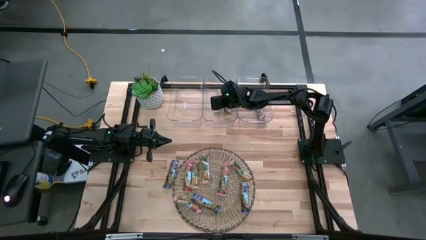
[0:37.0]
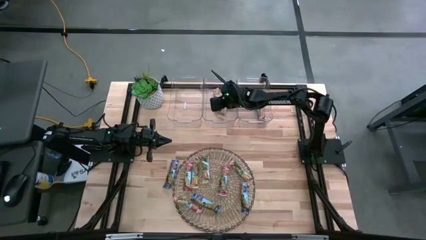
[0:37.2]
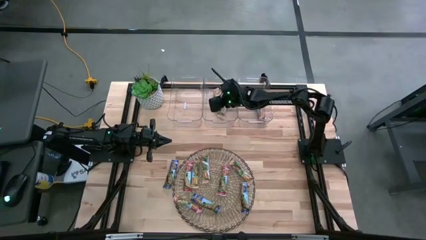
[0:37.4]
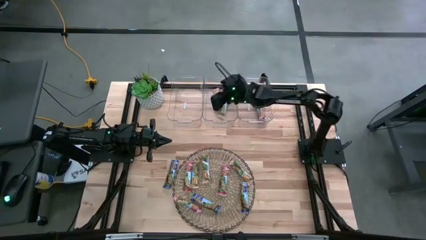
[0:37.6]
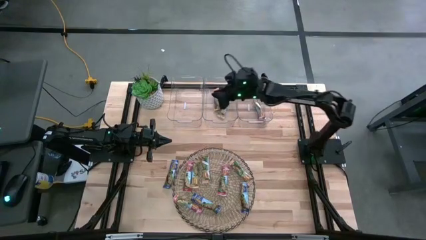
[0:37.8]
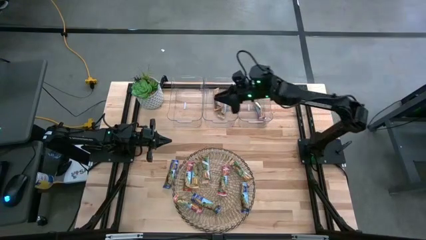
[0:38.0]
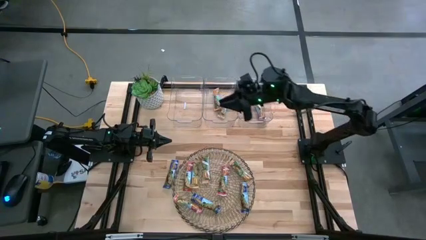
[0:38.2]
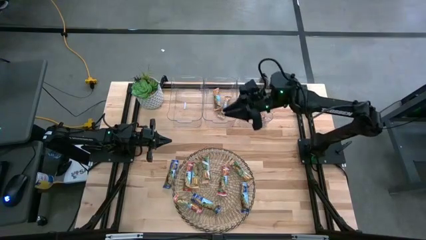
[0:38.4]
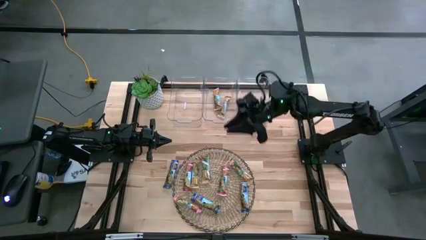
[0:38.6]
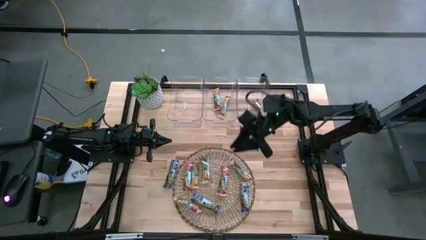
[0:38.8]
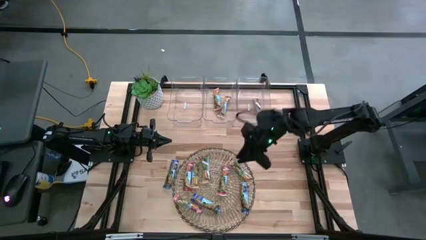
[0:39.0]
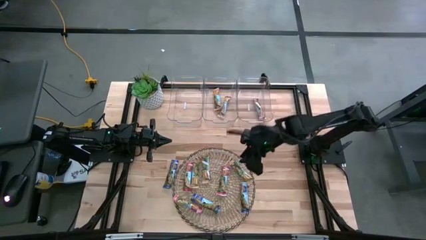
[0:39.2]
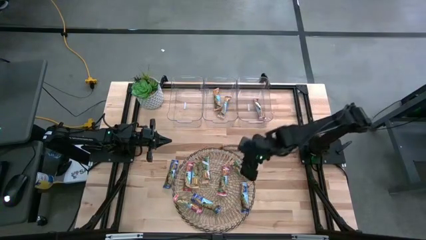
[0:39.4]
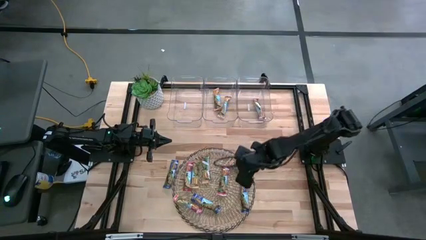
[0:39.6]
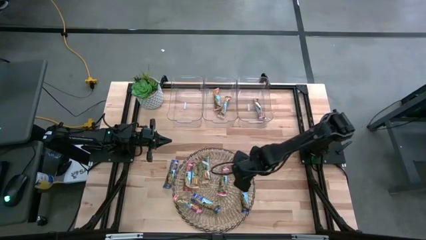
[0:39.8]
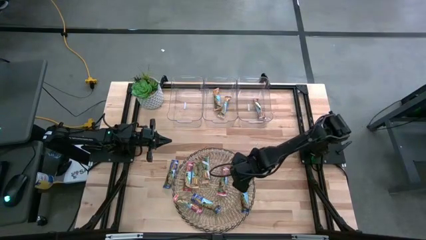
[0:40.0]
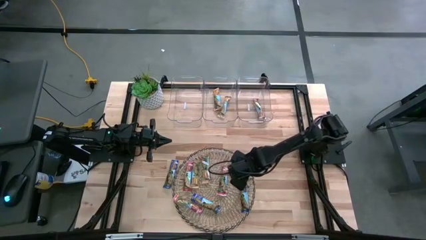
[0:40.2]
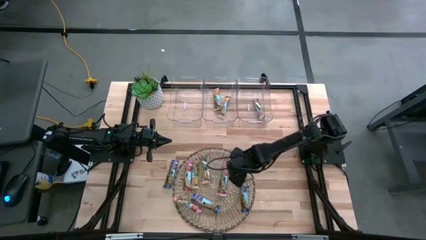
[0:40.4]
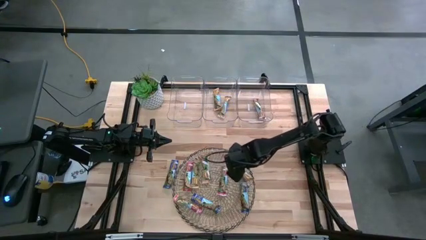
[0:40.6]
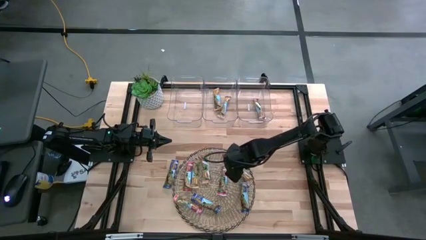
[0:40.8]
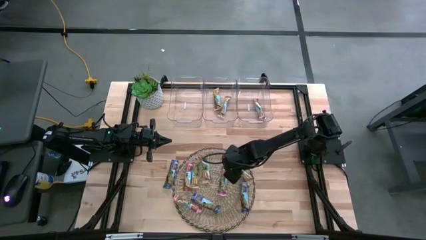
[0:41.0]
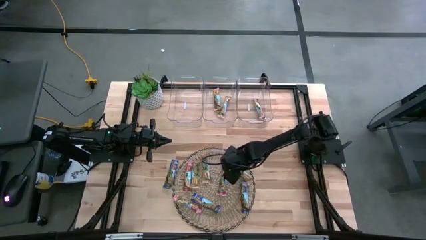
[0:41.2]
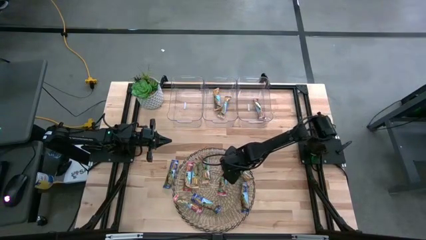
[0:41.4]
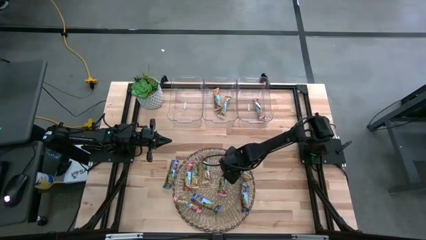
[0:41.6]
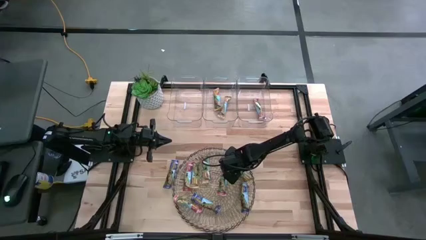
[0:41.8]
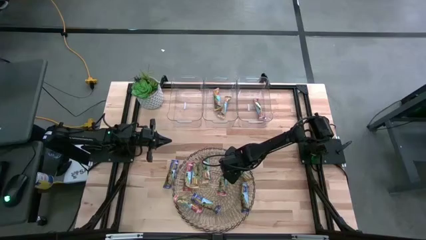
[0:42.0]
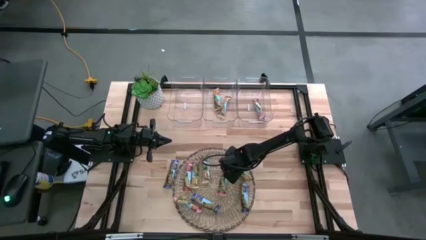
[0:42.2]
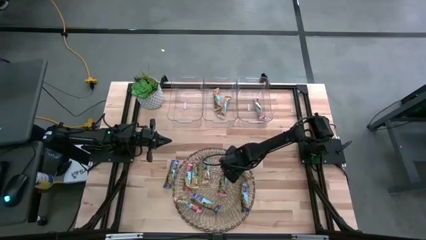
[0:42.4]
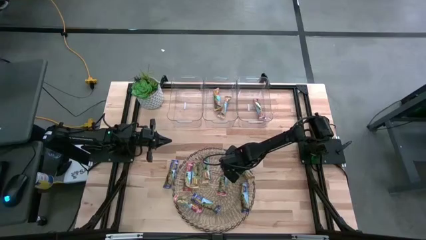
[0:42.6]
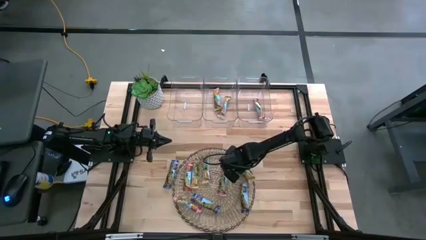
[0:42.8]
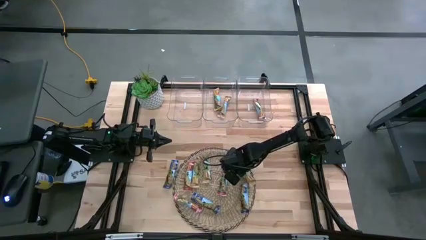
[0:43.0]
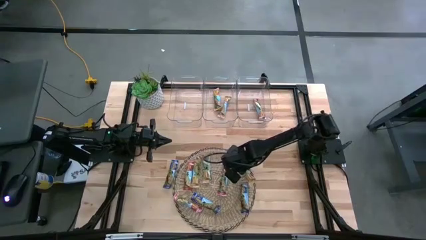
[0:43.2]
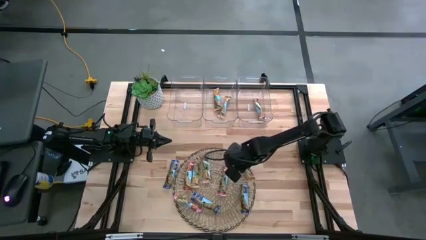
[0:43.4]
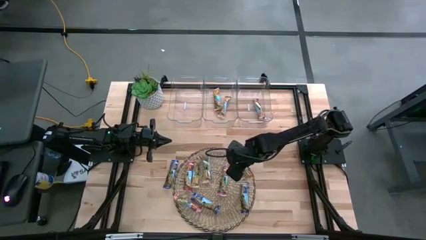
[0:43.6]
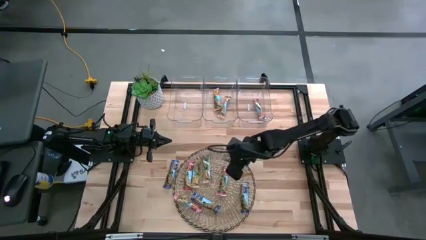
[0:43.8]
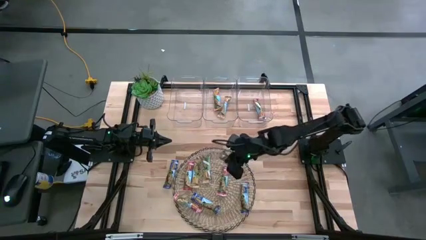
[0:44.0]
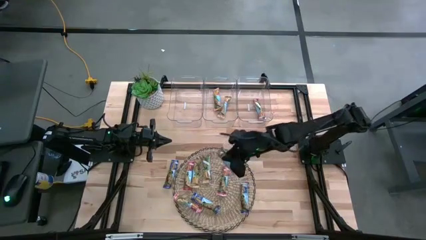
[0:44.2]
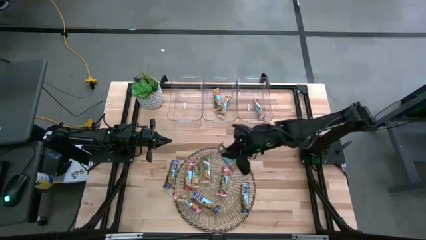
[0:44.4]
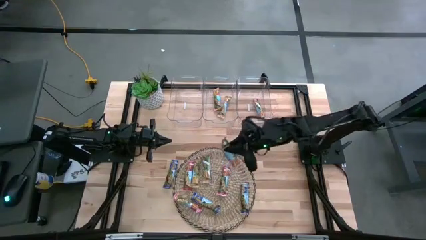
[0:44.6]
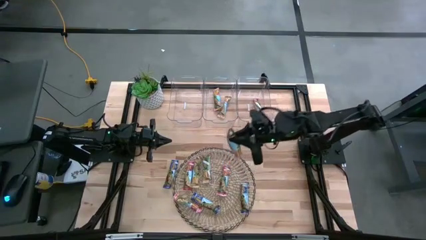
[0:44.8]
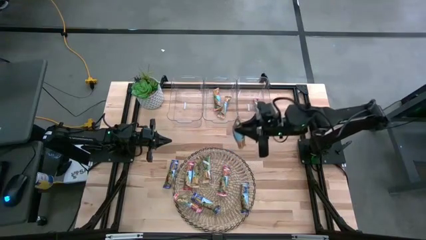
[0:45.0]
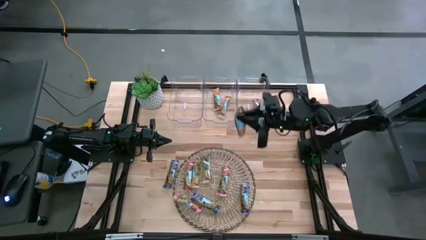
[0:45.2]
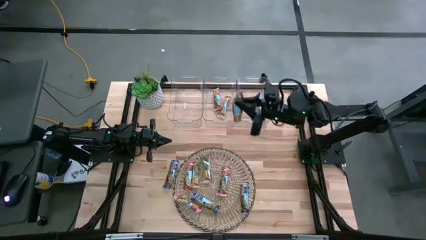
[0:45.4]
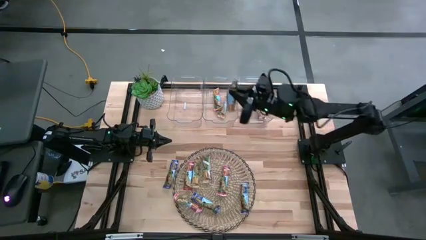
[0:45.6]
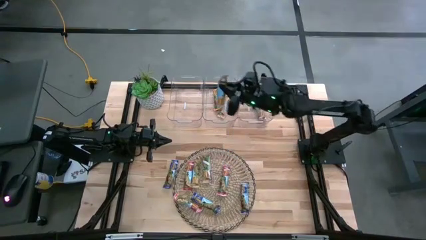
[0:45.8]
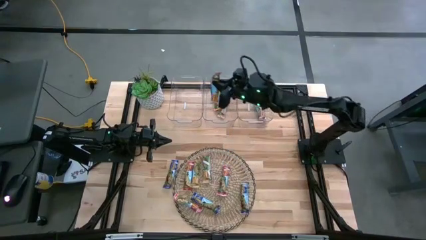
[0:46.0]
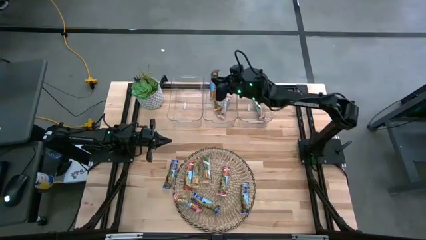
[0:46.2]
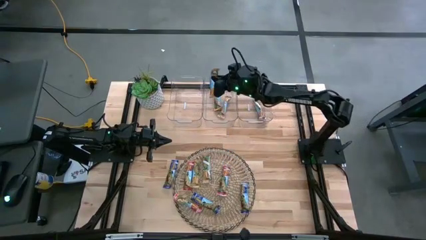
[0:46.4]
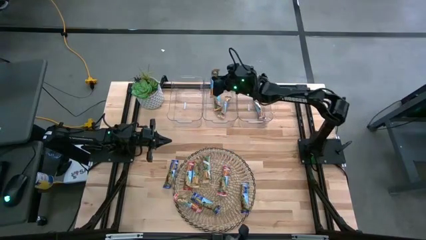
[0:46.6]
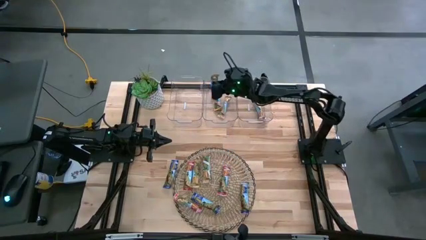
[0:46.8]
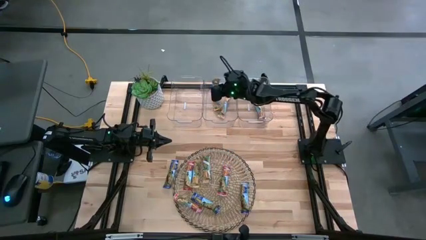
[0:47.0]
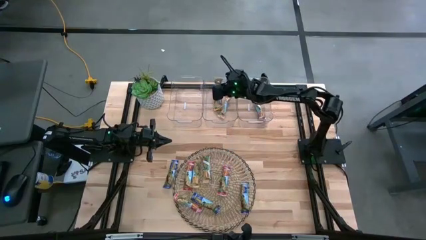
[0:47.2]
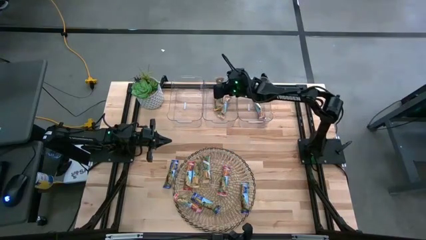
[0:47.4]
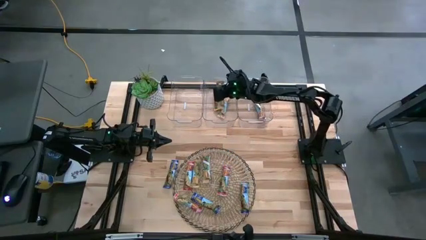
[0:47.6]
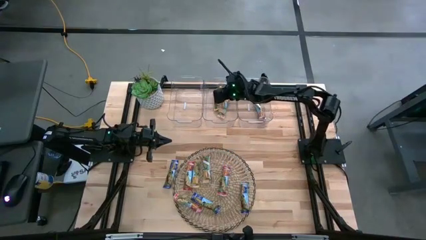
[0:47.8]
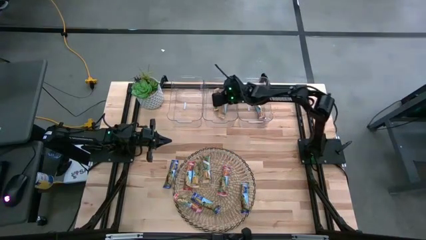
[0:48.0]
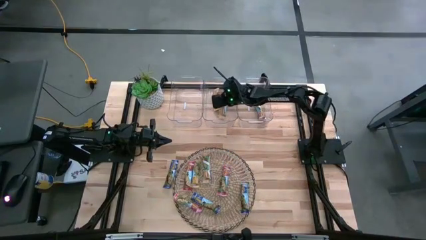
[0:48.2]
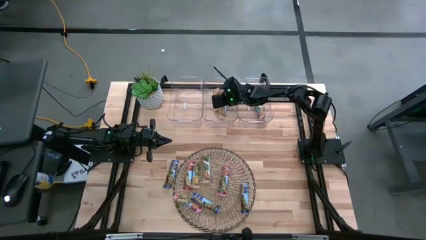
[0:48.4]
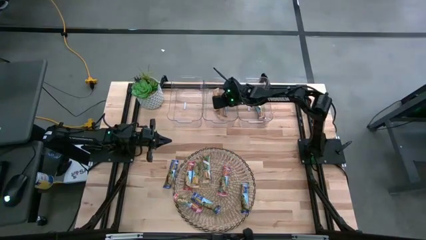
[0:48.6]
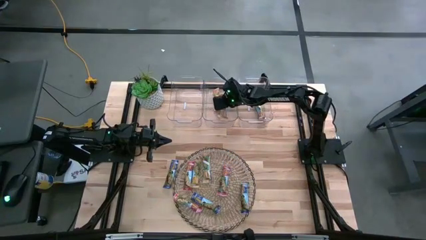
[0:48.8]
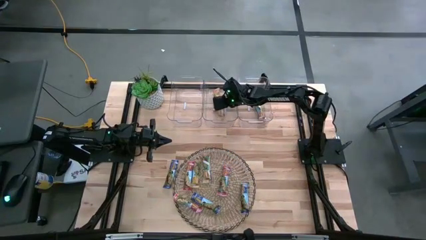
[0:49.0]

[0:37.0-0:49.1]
Task: Pick and place Granola Bars by type
Put the yellow granola bar into the middle transparent bin

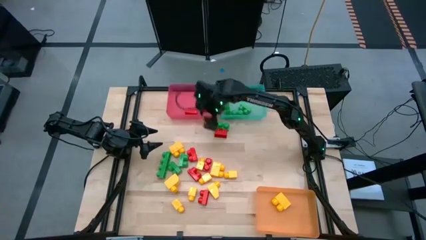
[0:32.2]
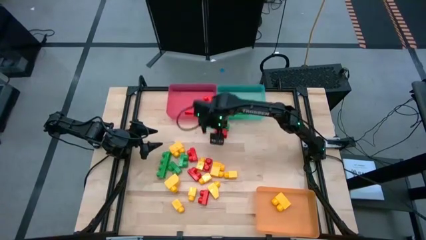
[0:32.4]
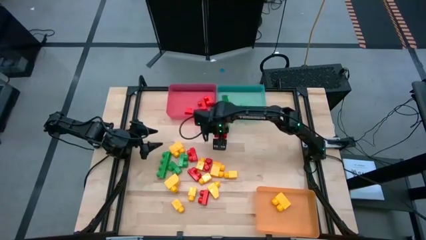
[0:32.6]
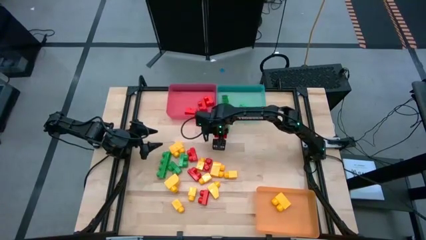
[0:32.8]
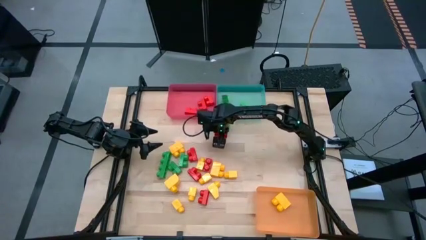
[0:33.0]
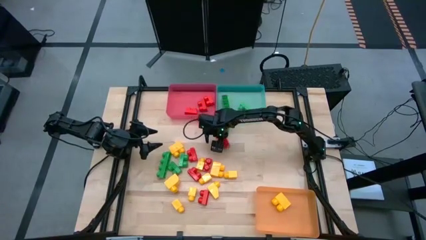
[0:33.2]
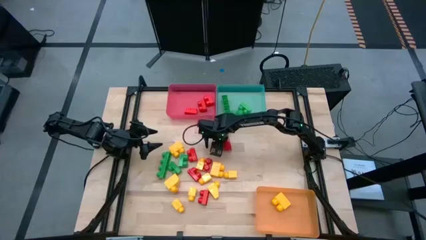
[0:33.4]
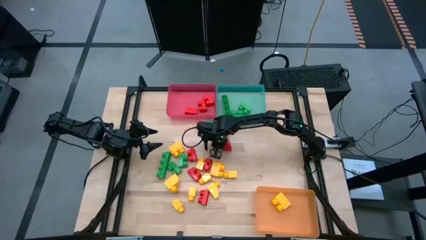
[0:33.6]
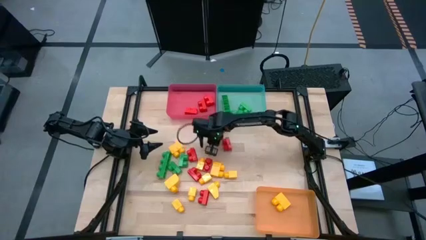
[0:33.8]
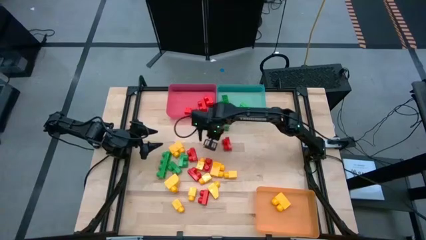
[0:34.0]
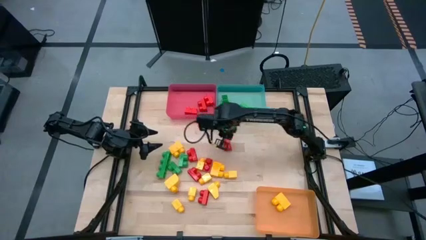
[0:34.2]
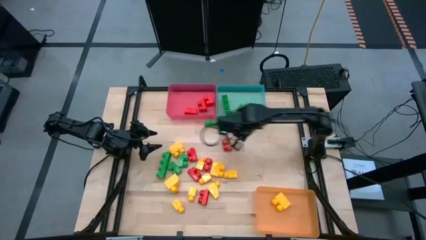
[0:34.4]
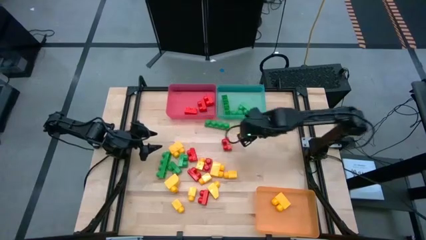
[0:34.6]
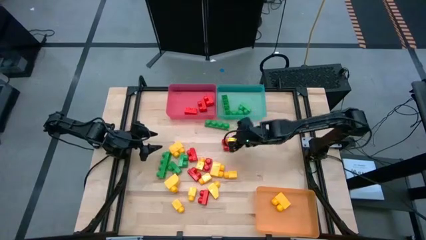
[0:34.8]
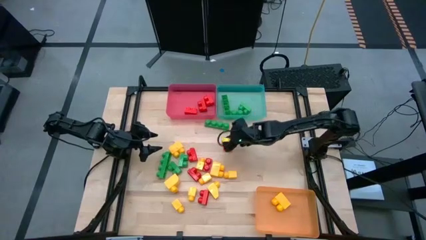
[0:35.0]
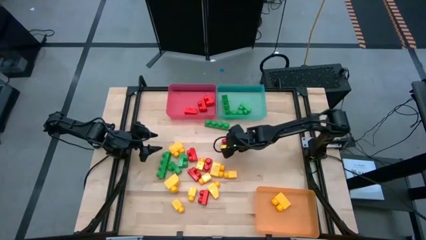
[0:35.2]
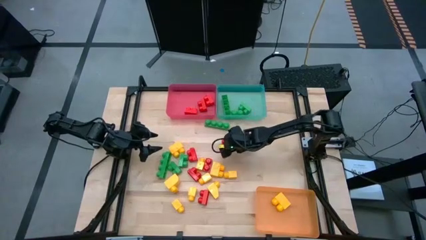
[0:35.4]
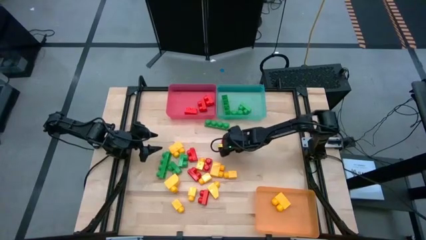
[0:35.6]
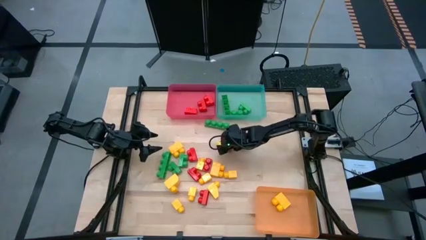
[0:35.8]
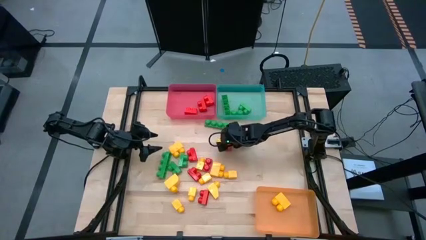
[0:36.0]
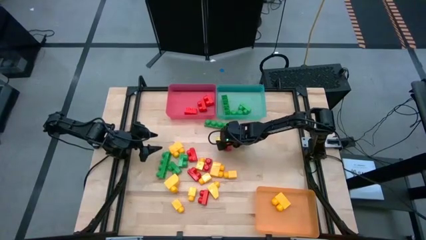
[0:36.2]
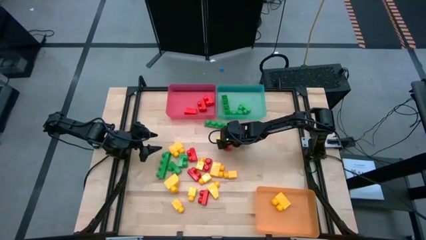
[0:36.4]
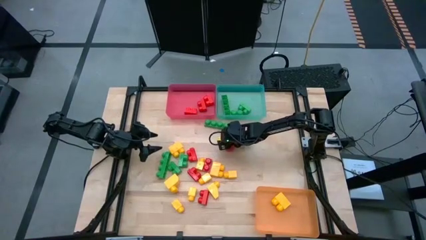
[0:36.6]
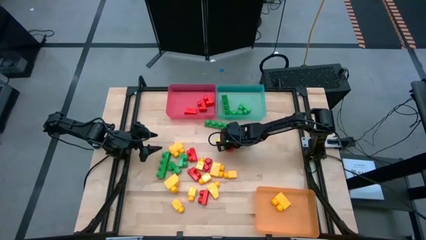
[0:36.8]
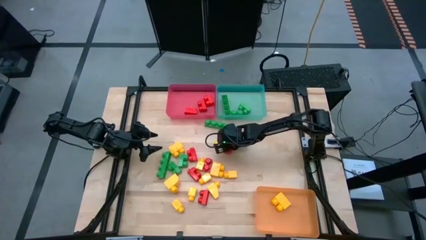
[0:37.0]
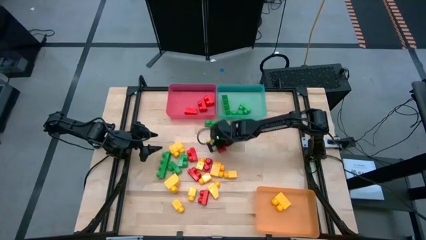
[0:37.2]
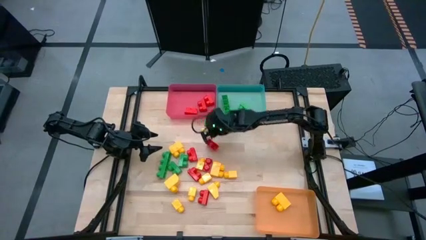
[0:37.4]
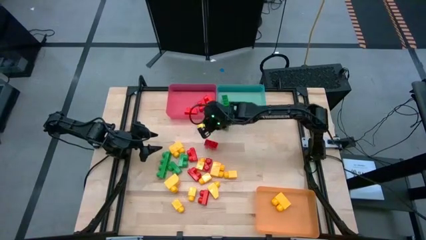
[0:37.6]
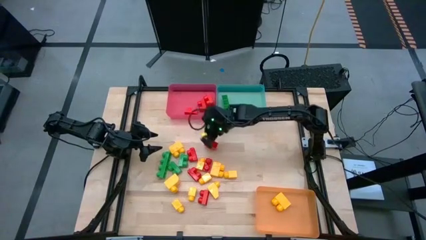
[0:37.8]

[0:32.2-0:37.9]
Task: Sort blocks
Put the red game piece into the red bin
